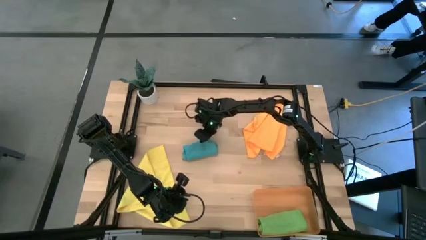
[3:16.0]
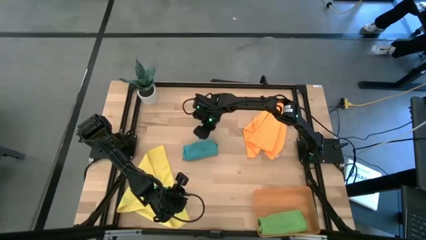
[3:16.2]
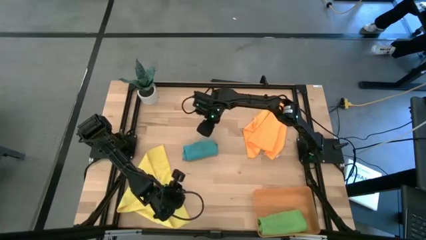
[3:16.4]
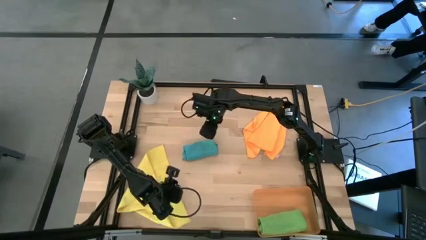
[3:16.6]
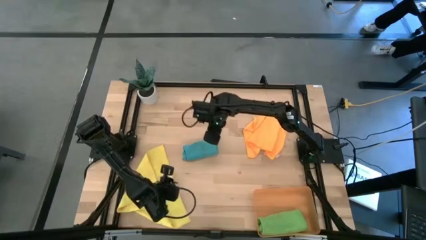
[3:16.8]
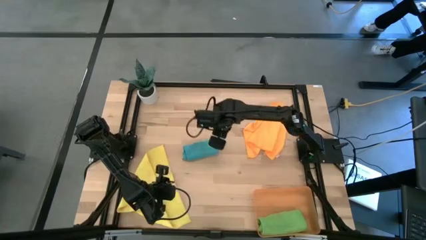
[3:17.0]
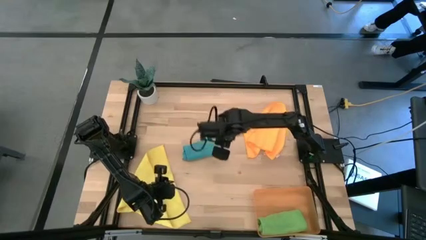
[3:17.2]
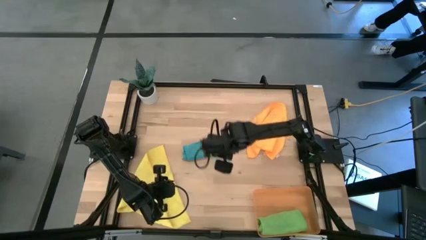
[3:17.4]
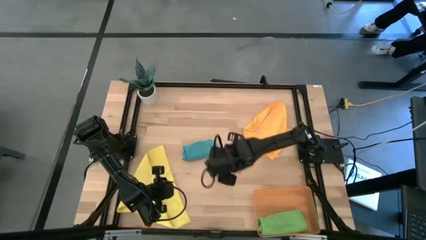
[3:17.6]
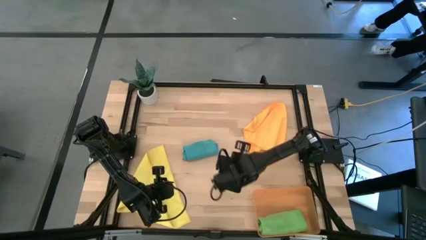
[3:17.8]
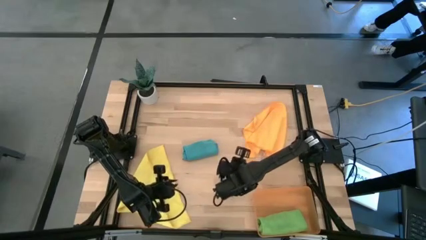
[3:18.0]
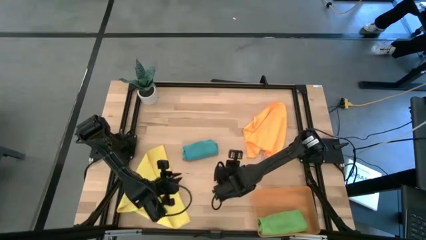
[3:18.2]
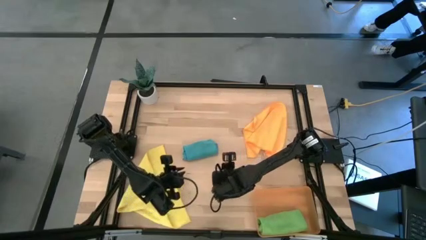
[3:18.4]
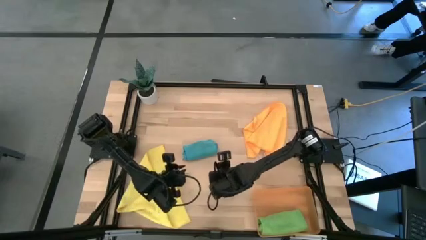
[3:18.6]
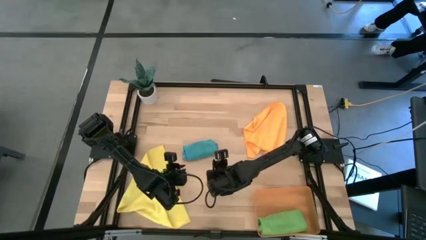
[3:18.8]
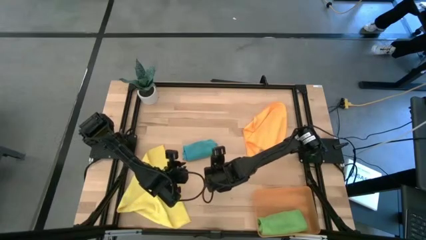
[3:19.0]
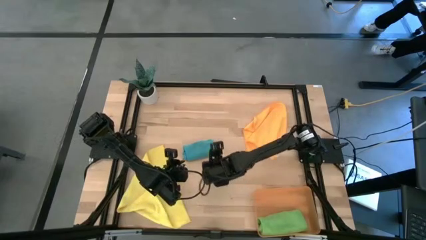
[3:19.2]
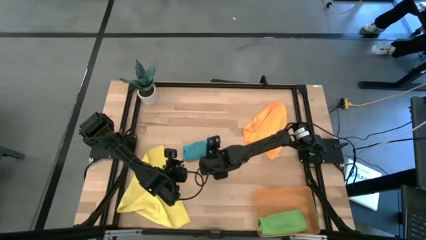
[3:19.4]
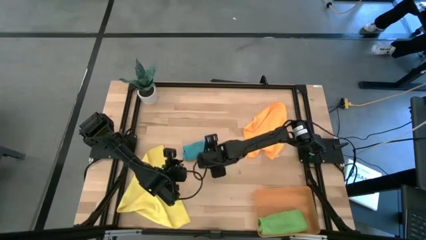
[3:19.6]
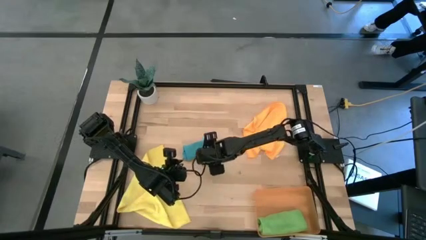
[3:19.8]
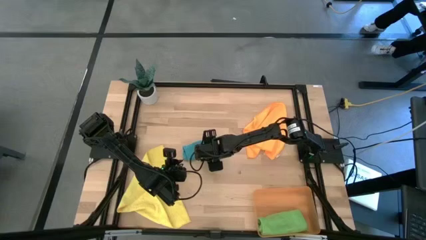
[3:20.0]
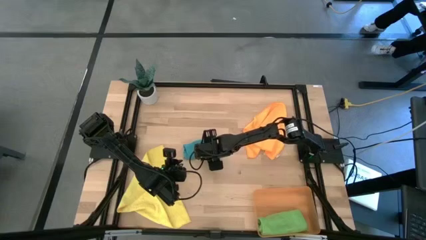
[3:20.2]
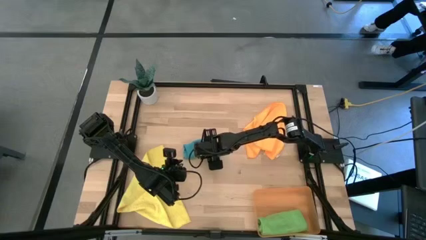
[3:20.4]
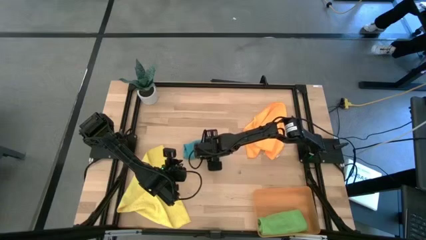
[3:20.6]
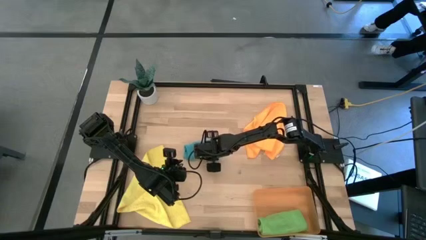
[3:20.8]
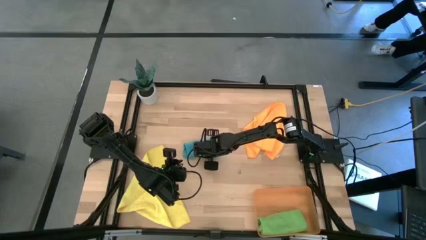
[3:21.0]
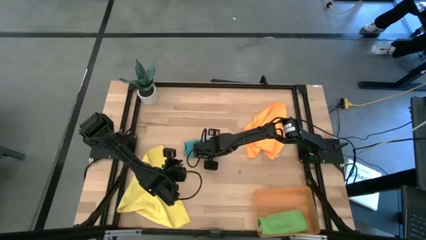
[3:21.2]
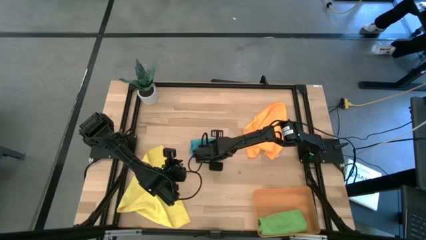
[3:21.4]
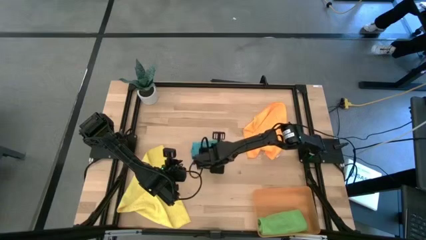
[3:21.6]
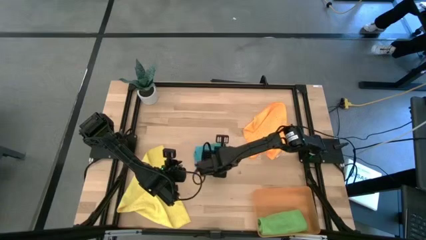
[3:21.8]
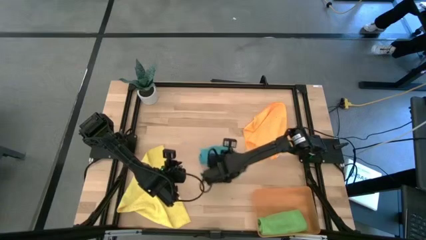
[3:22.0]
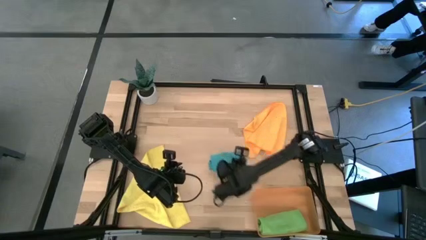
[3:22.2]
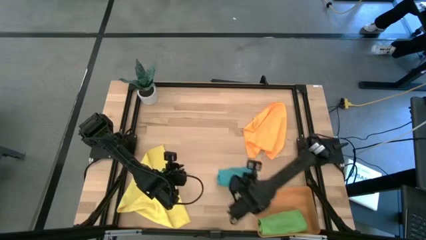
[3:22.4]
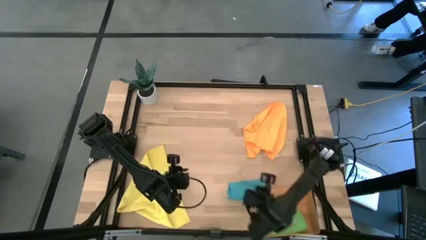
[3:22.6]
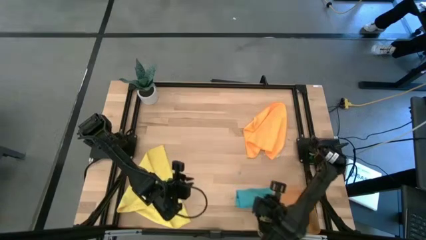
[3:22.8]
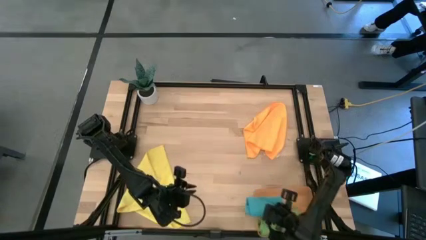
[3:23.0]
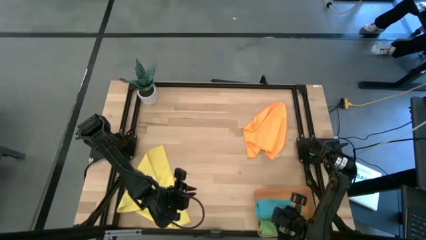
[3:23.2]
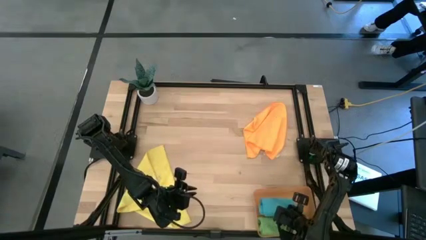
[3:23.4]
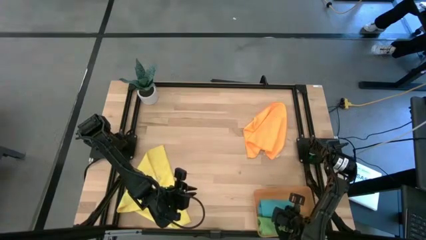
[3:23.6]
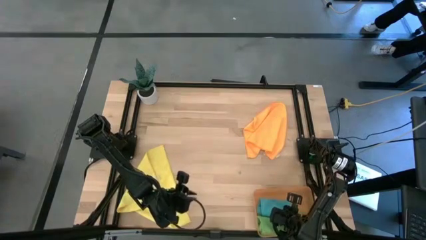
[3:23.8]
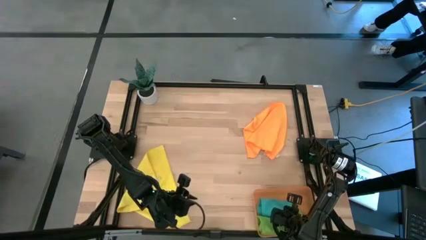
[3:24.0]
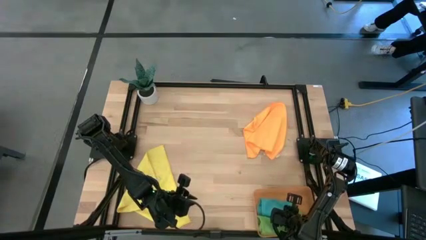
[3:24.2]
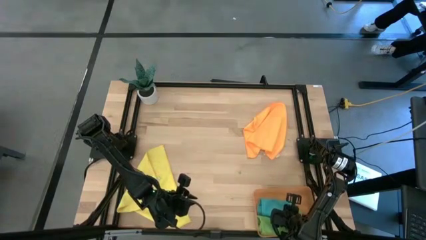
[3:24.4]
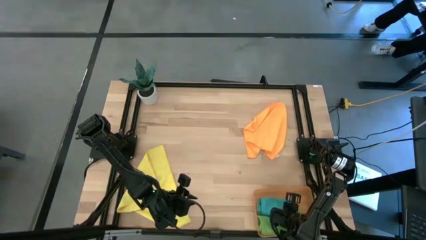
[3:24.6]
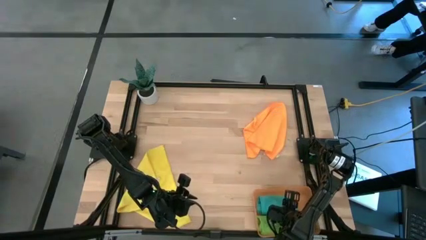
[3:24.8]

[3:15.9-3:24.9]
Task: Roll microfiber towels into tight, uniform cylinder then place into a basket
Put the blue microfiber towel into the orange bin

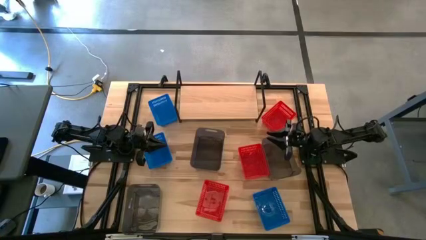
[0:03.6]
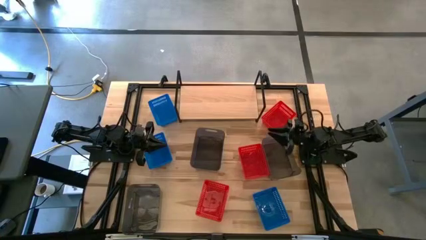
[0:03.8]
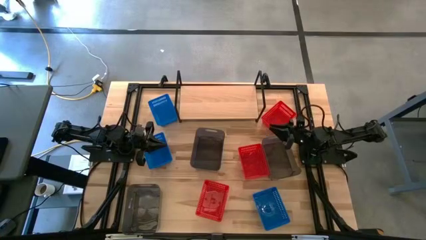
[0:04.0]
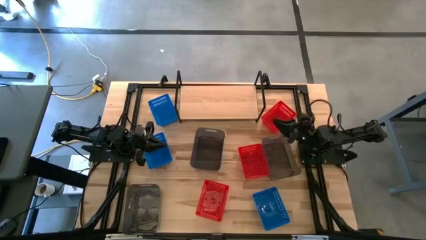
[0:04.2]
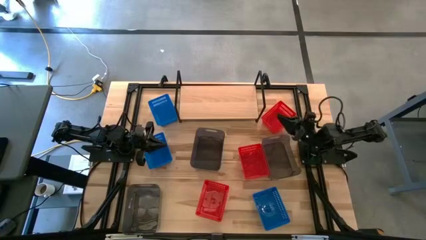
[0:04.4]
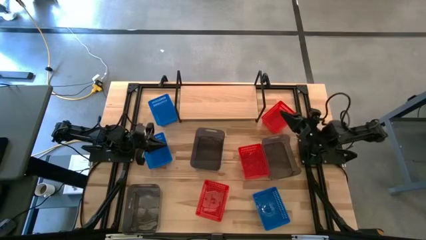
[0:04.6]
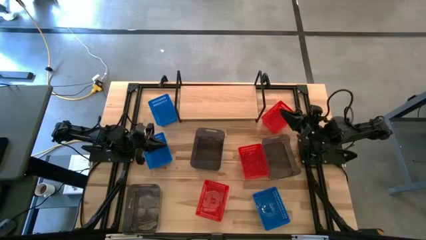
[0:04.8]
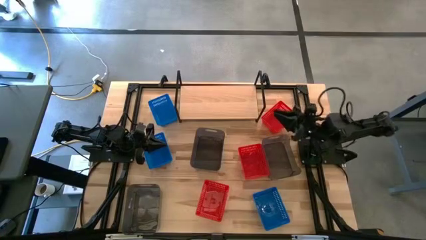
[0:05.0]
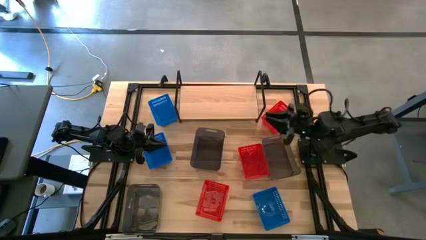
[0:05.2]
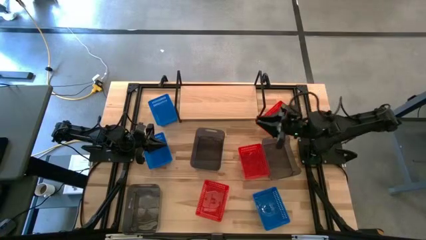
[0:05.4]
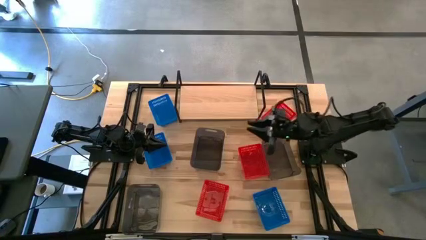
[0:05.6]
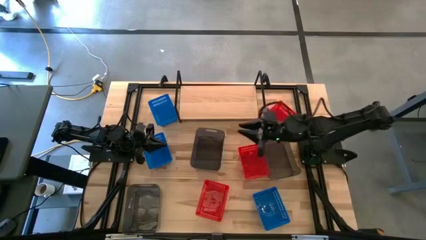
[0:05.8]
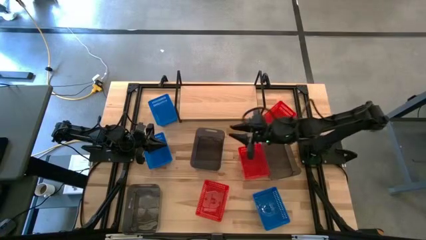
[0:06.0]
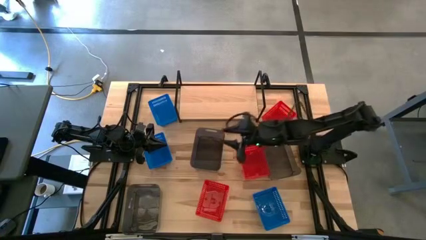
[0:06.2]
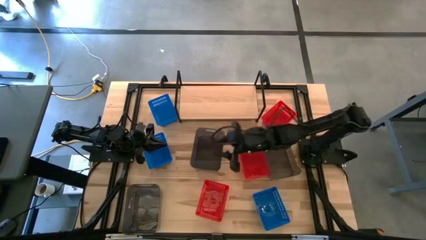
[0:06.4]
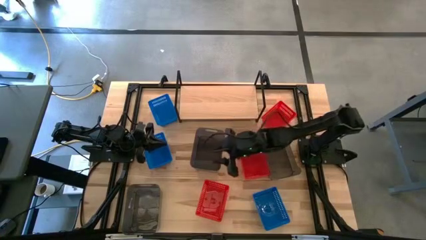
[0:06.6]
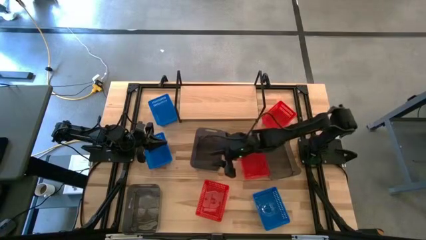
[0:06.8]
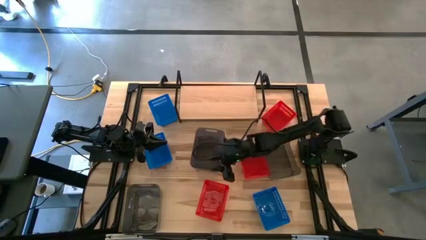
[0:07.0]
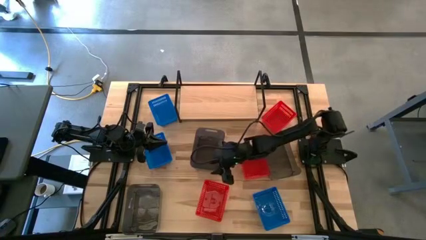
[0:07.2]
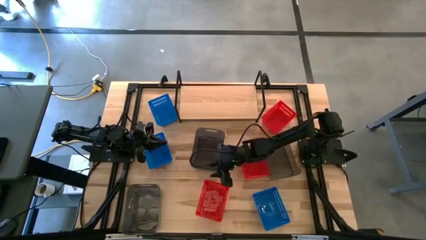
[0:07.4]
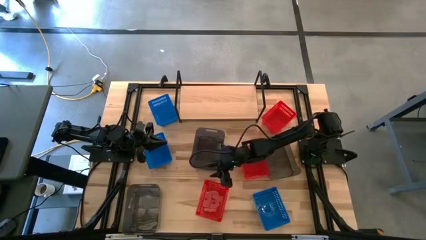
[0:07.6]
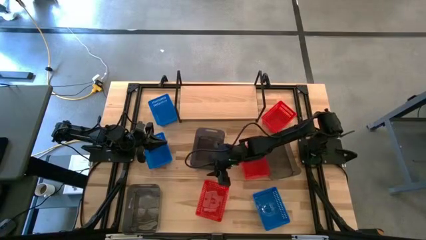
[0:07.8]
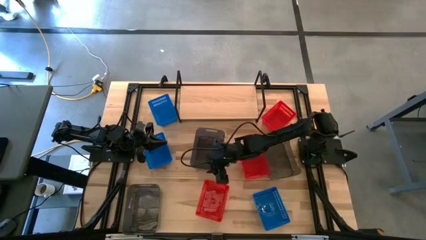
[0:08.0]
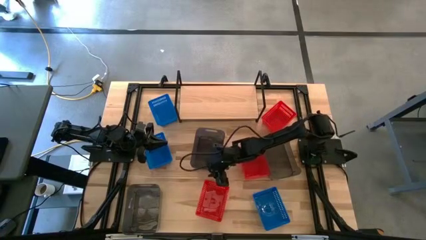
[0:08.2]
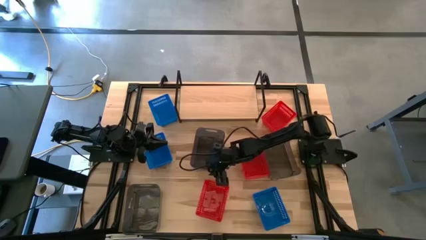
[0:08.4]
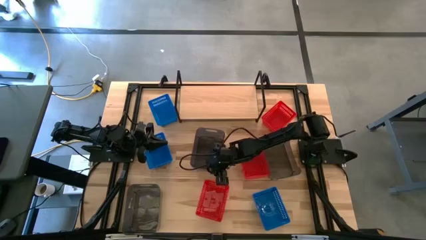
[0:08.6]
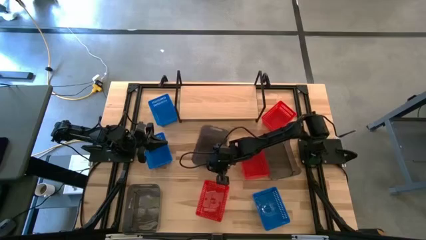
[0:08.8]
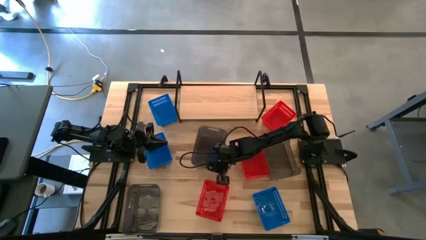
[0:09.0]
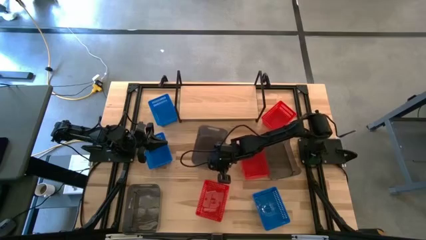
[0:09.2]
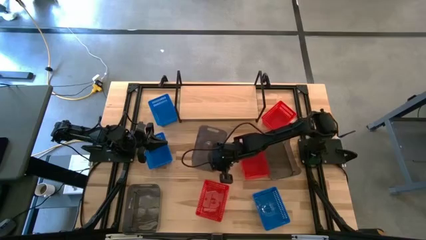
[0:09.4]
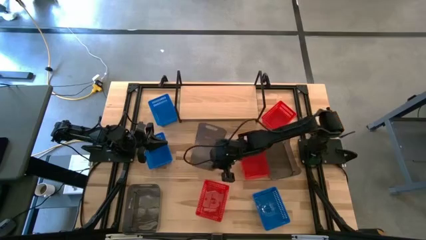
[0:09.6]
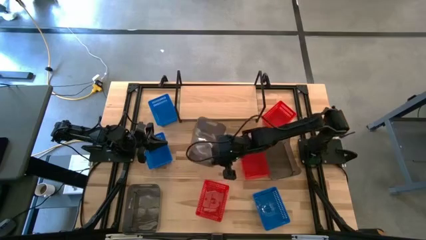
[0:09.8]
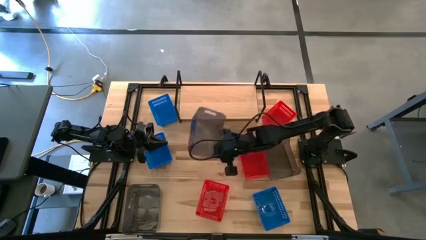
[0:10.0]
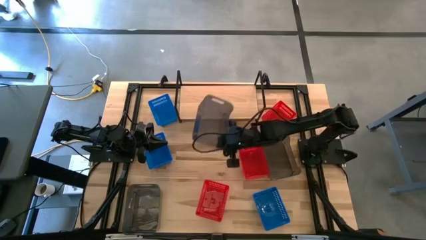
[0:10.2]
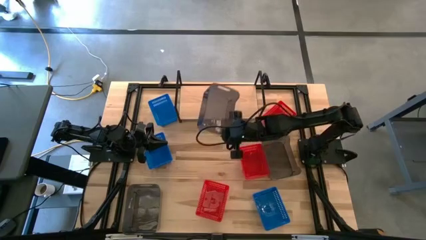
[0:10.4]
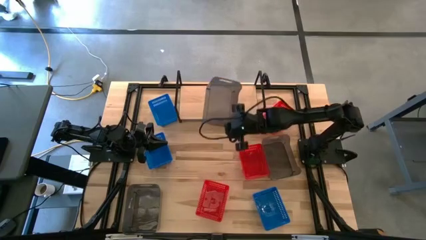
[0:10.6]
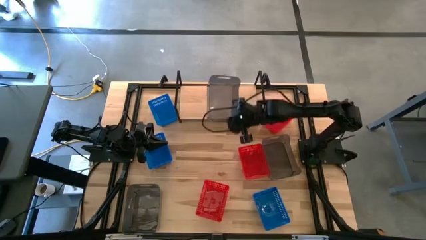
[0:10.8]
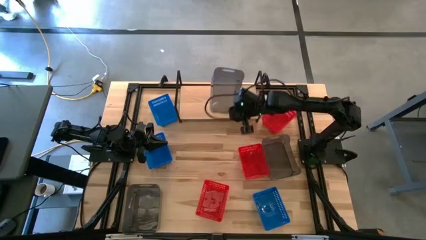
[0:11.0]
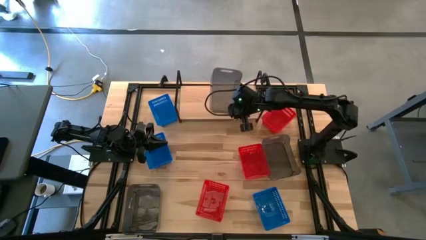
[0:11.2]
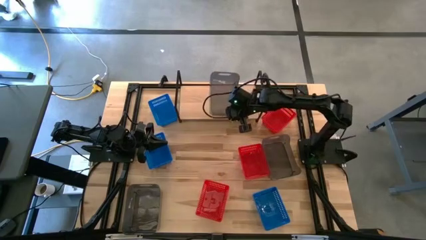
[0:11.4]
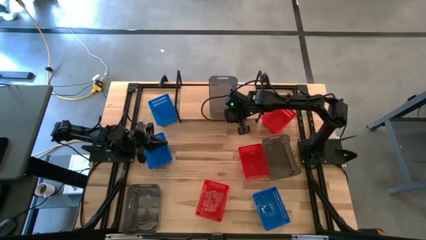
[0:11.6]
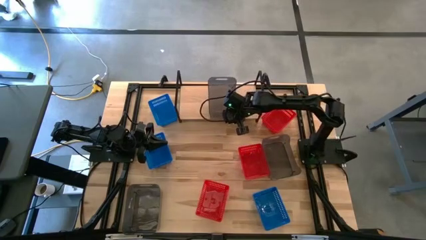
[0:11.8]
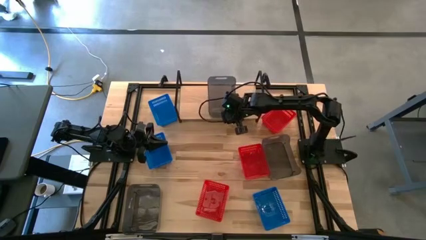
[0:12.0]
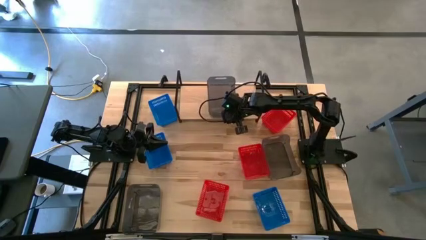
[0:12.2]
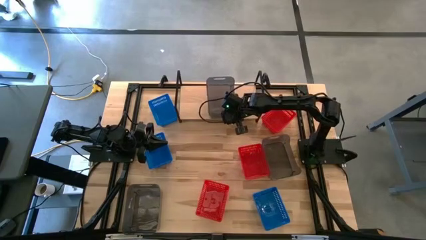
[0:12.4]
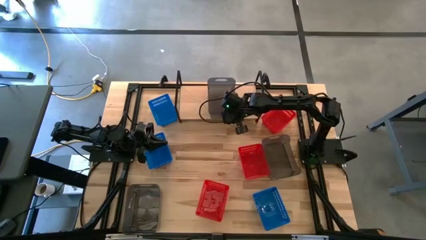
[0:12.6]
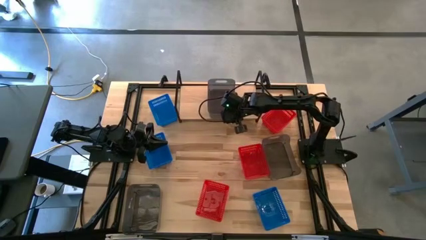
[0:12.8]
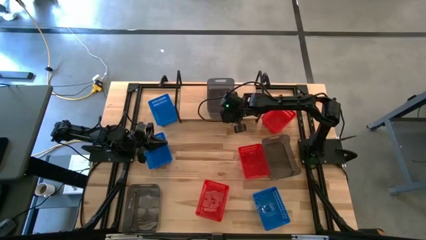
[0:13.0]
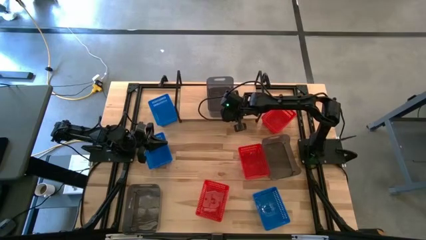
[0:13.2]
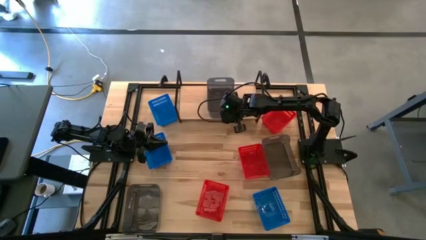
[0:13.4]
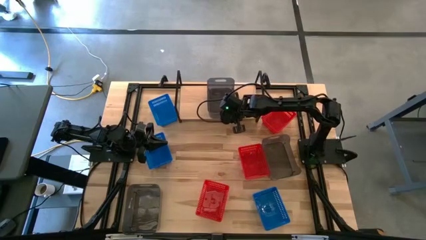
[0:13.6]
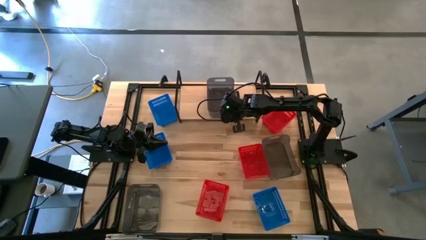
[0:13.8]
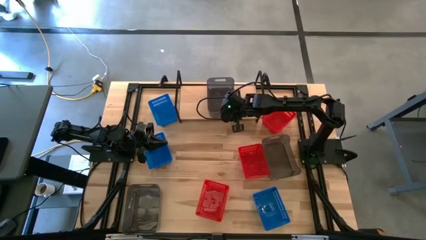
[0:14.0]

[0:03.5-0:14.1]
Task: Stack baskets on shelf by color
Put the middle black bin on the shelf
